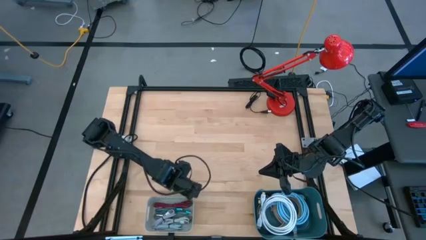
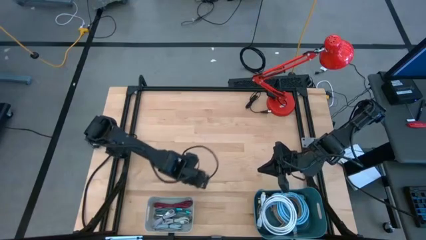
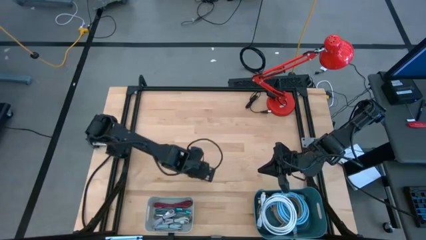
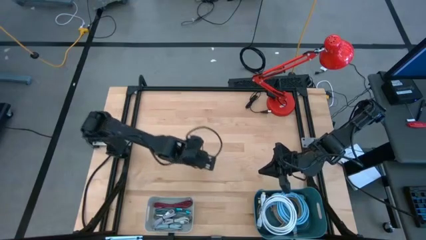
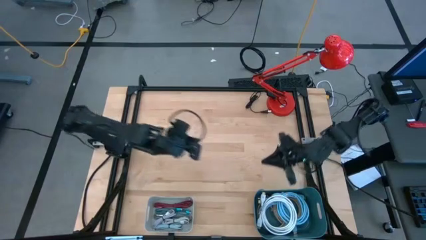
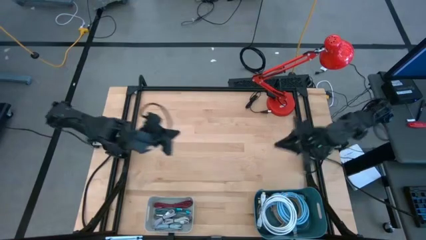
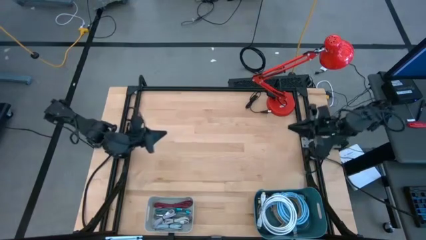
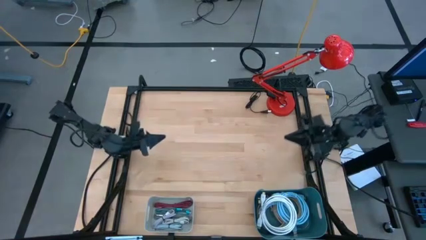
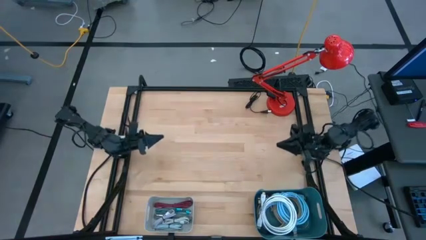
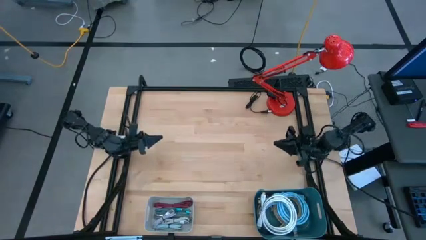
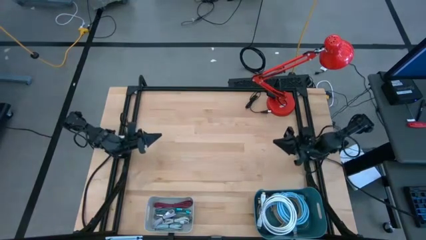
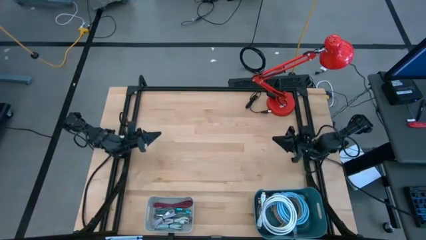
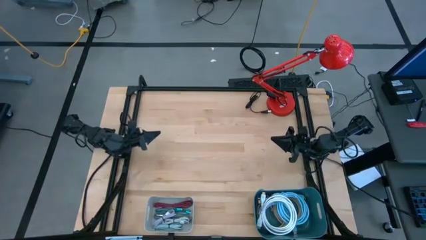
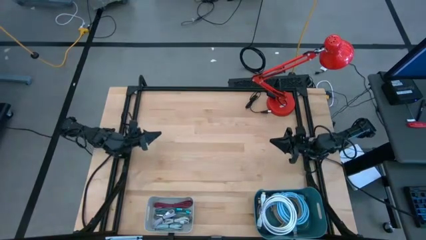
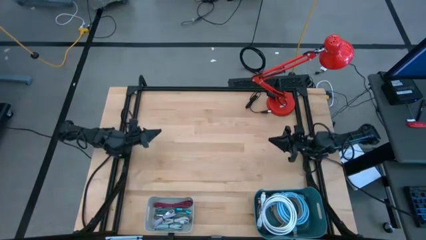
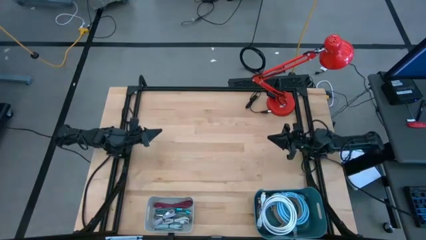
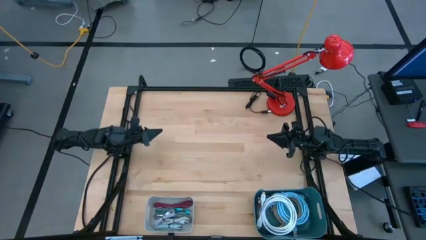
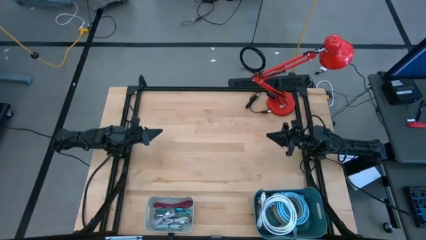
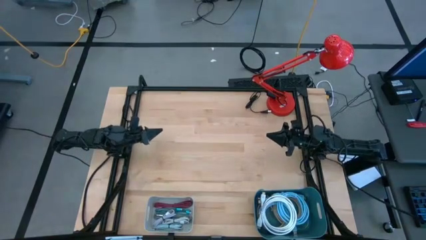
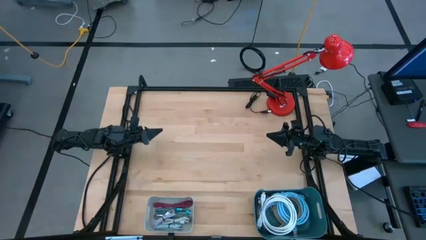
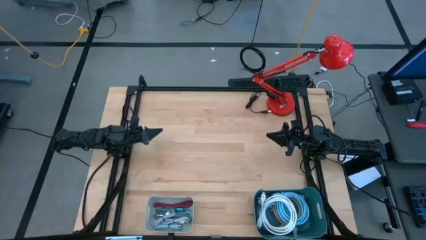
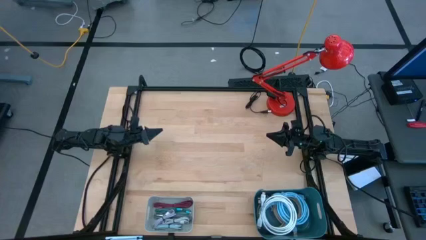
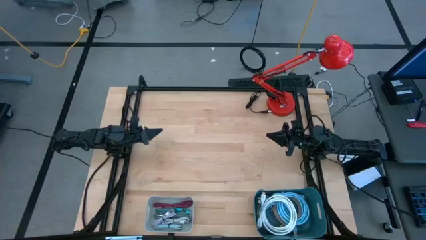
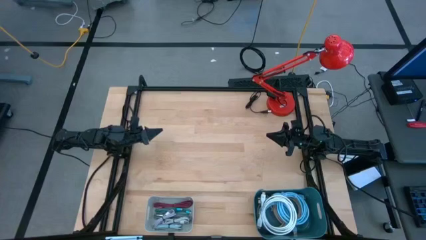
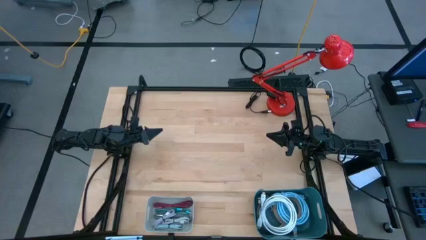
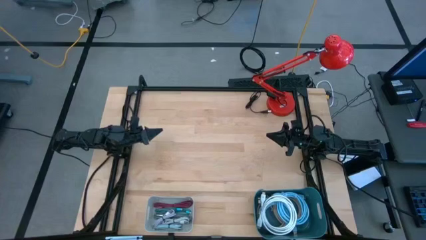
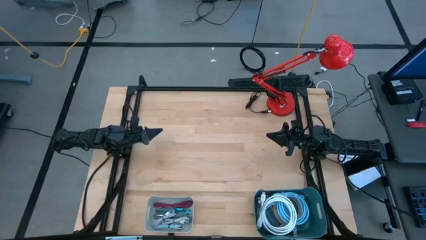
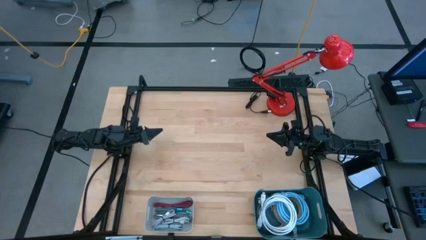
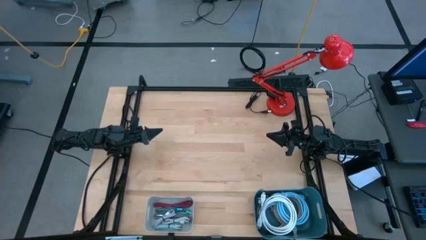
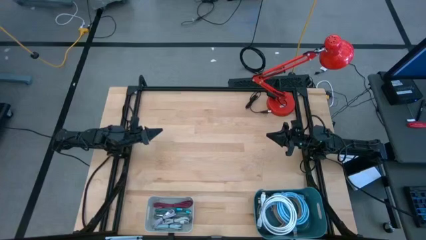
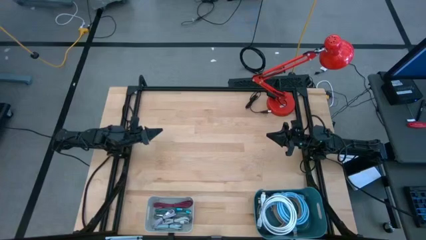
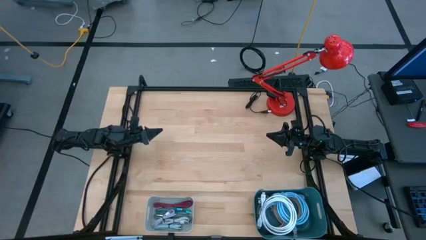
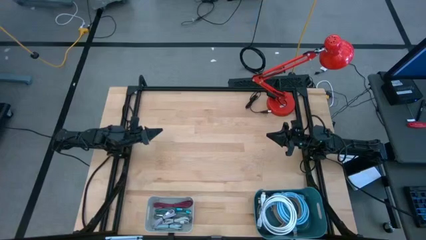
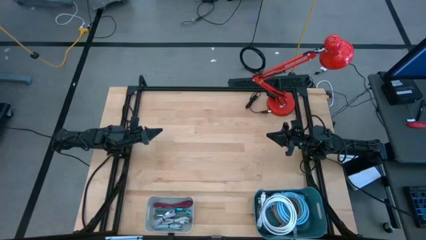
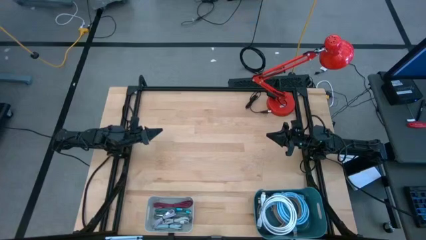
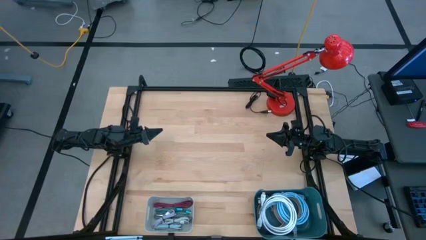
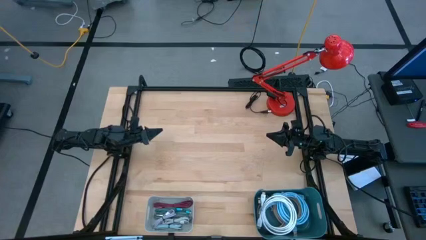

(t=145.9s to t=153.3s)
Task: Pick & Place USB Port
Return to Home Position

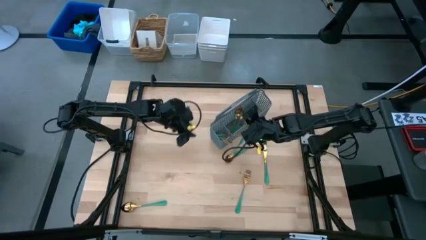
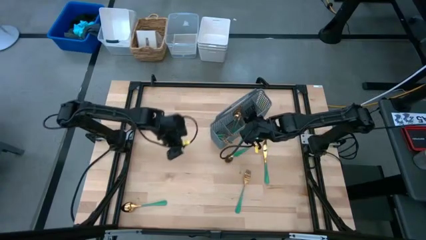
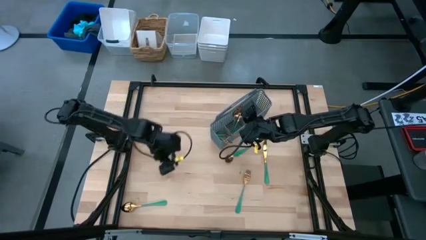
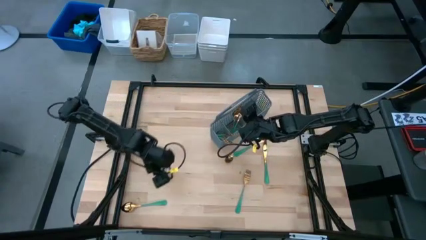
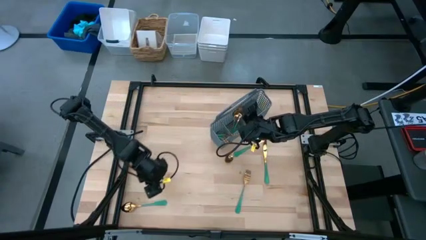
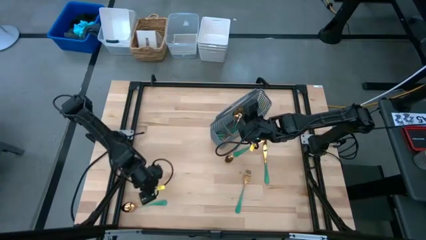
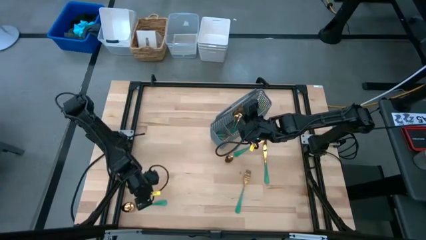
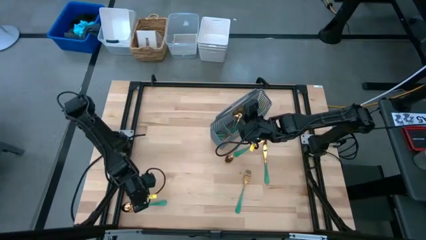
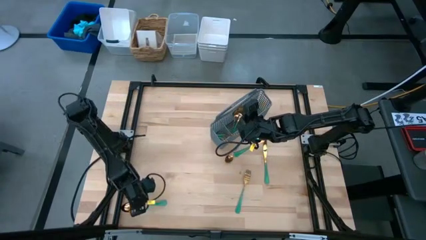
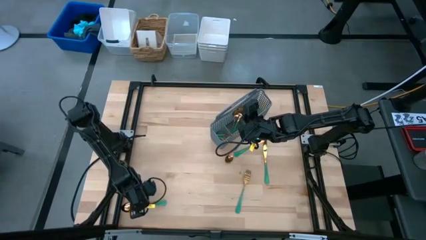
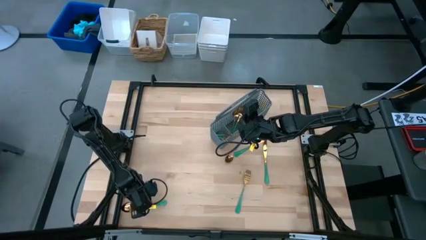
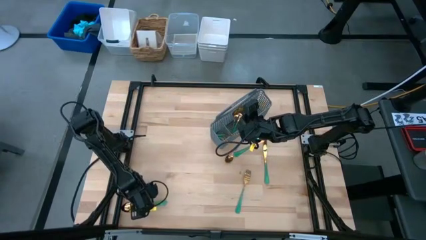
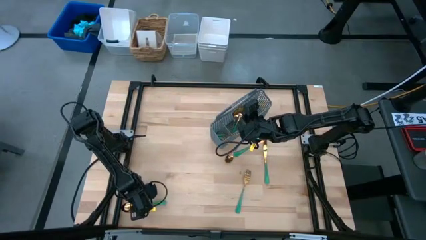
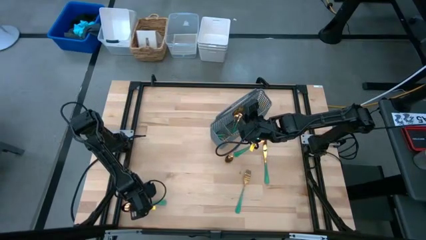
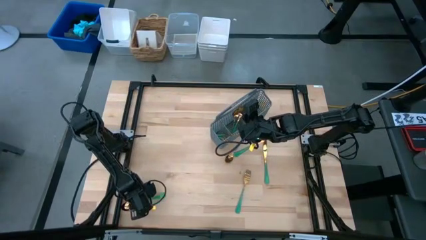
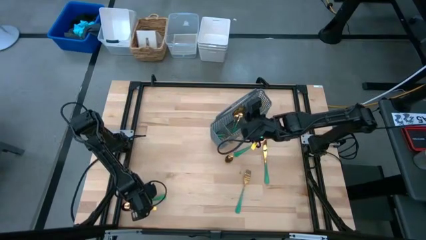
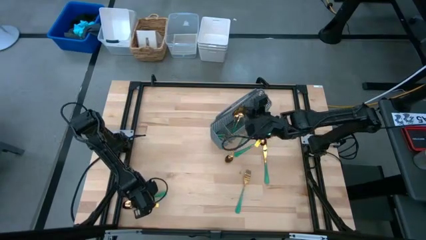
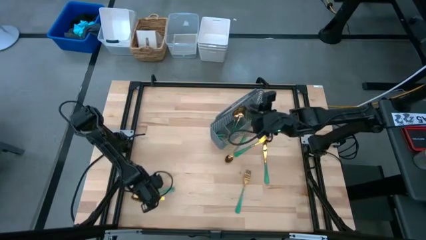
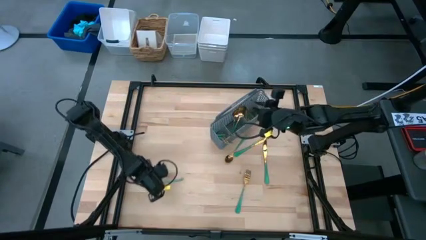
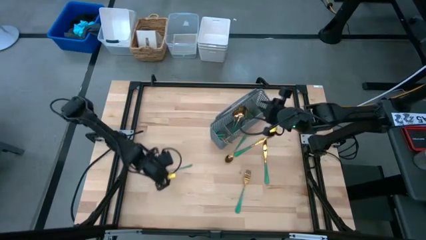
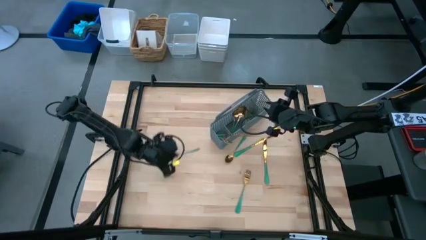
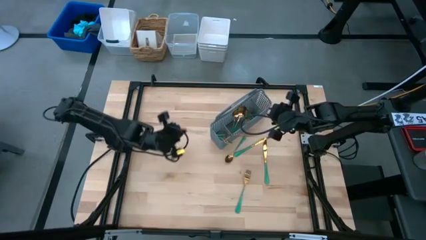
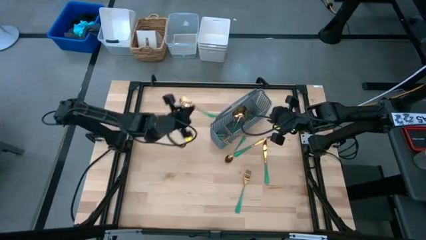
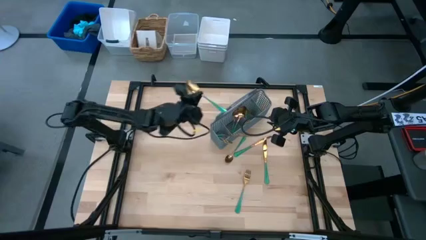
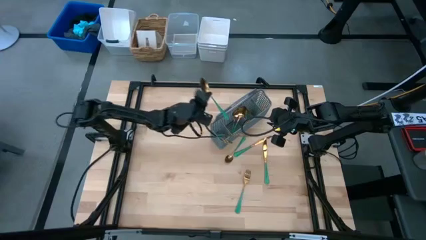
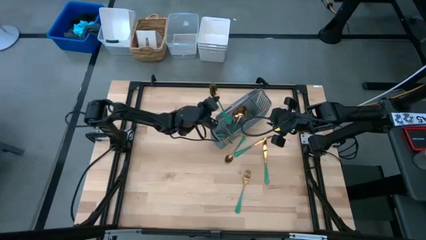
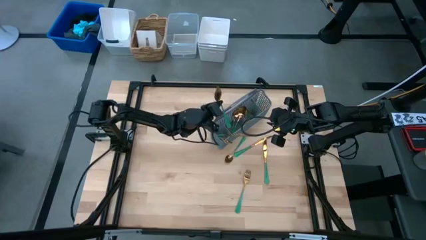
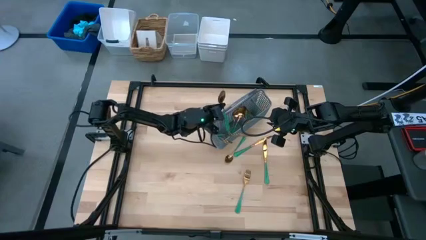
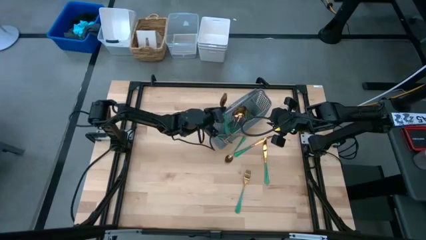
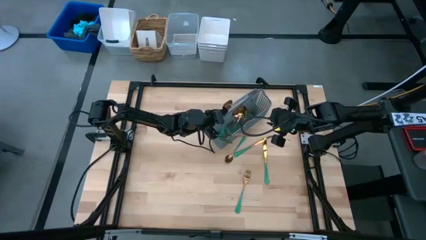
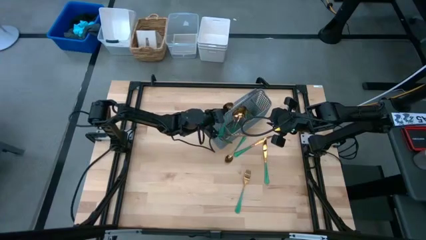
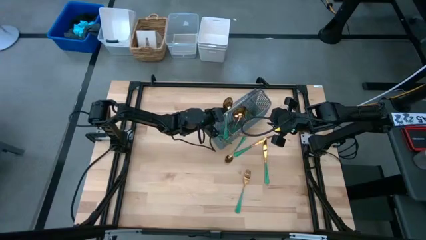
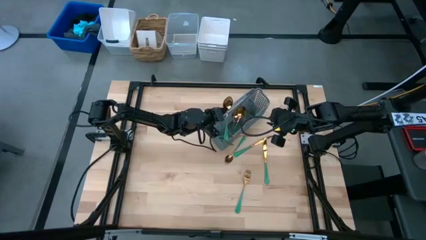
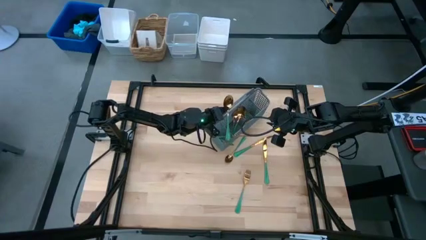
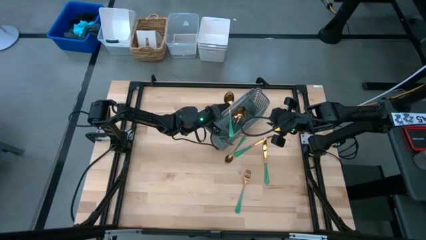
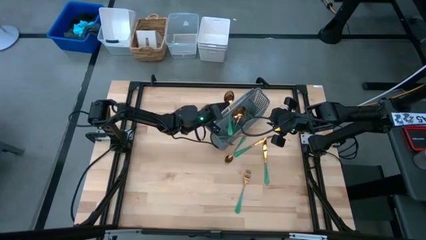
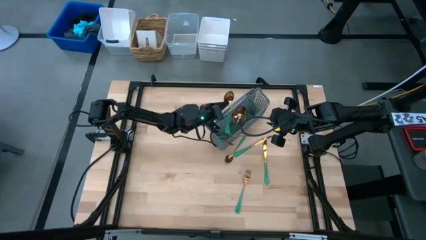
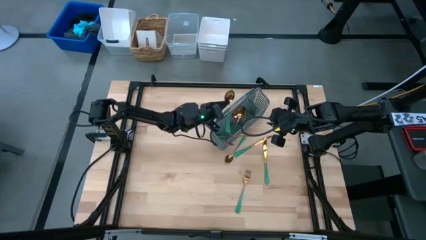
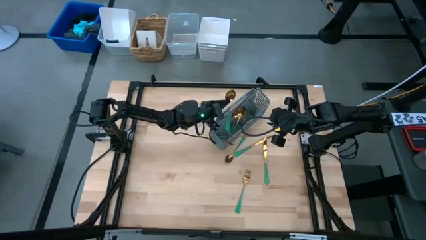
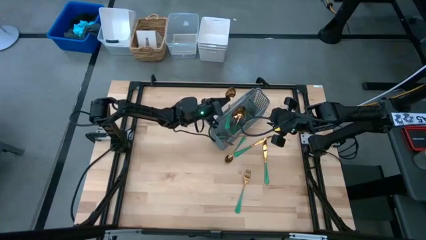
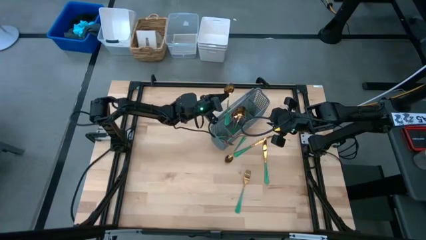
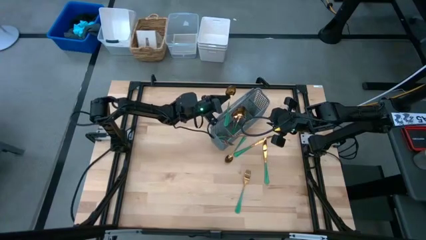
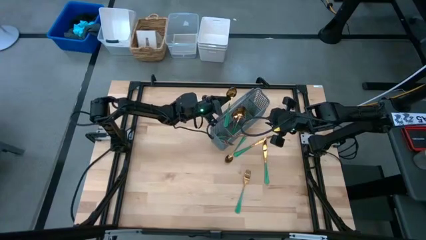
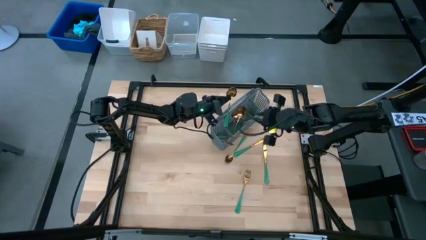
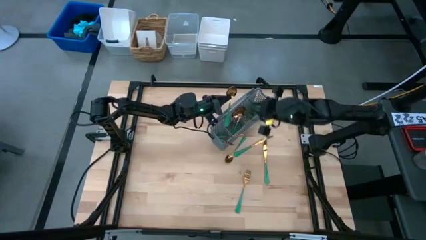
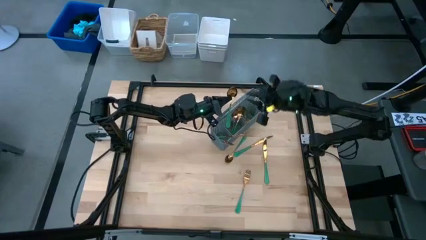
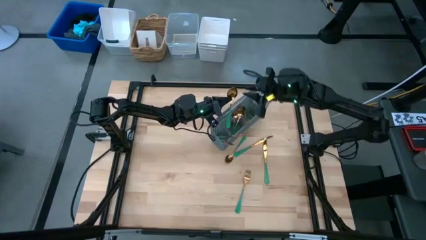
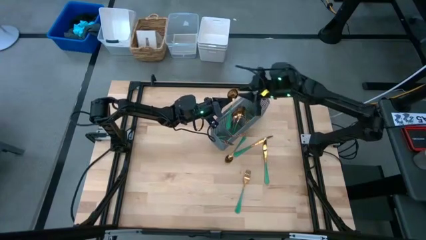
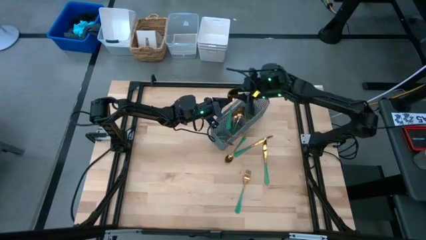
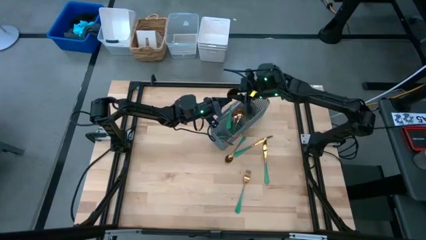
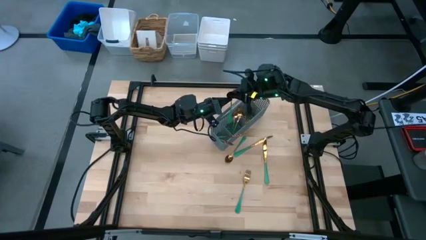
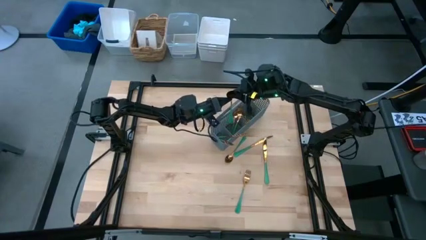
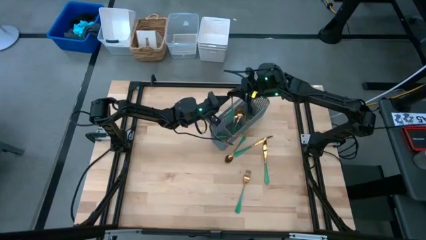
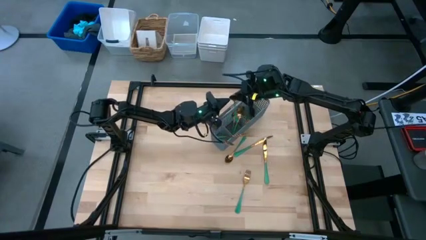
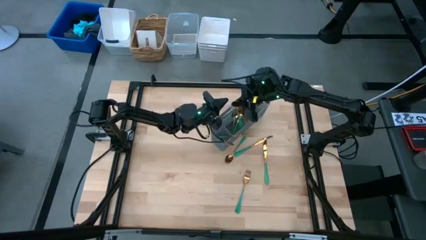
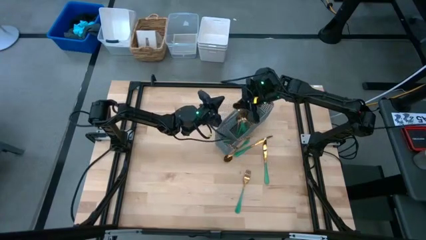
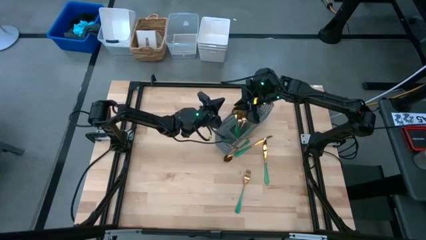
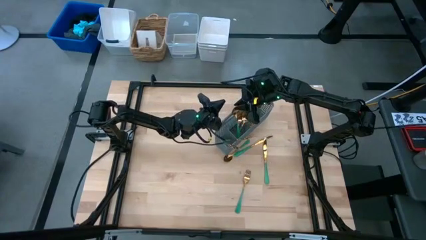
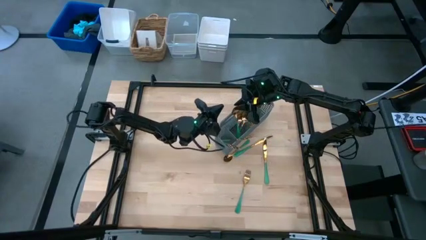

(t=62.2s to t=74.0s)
Task: Sort silverware
Put the bottom left spoon into the basket
